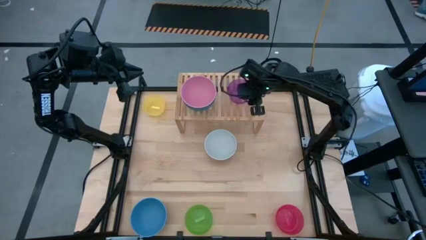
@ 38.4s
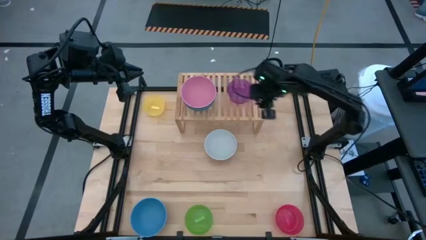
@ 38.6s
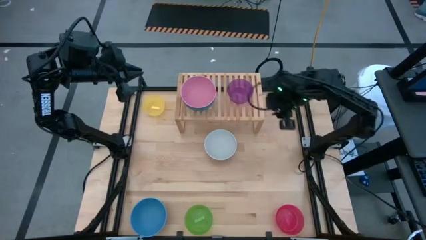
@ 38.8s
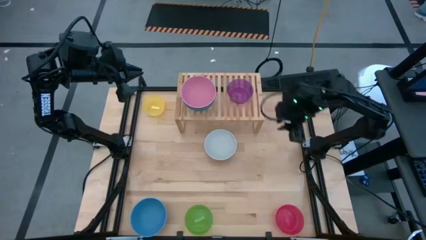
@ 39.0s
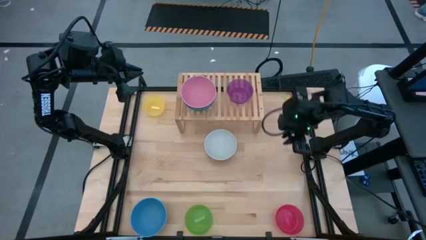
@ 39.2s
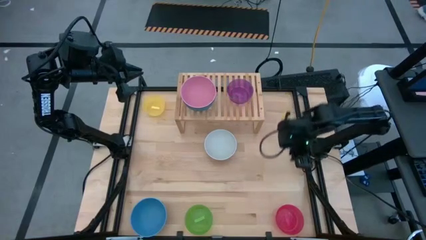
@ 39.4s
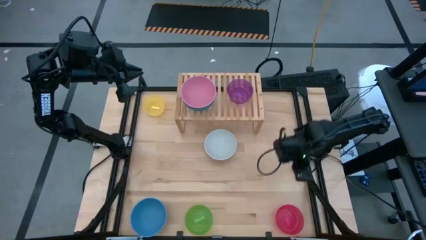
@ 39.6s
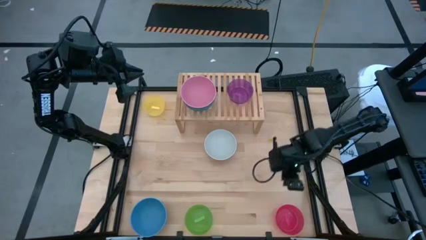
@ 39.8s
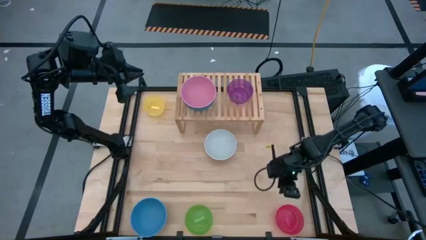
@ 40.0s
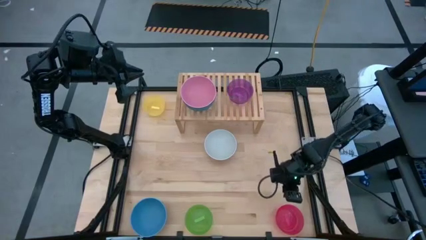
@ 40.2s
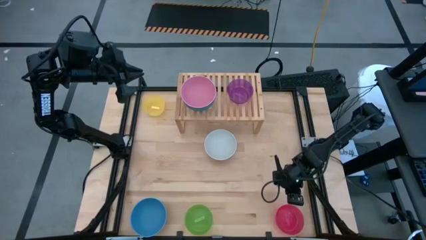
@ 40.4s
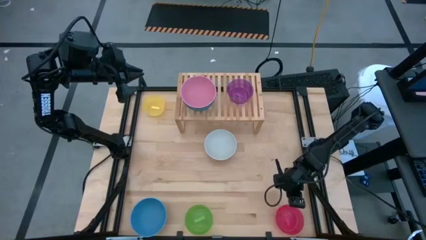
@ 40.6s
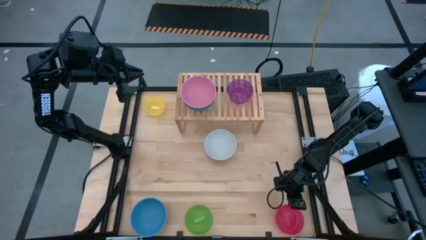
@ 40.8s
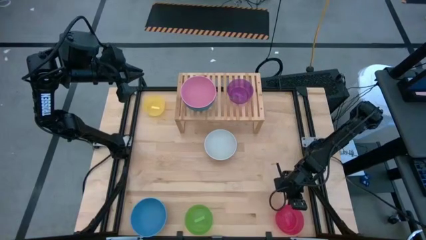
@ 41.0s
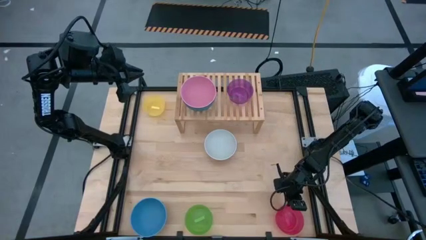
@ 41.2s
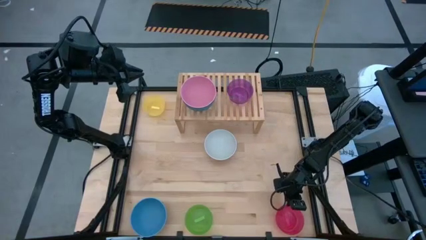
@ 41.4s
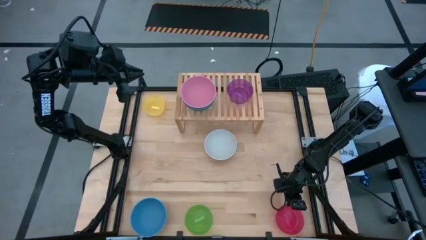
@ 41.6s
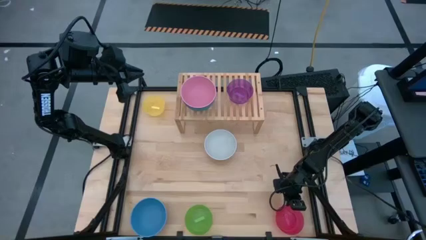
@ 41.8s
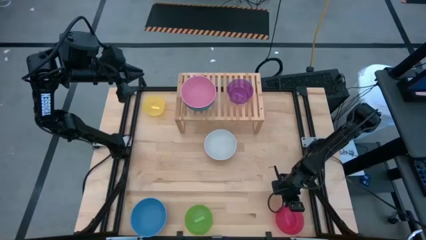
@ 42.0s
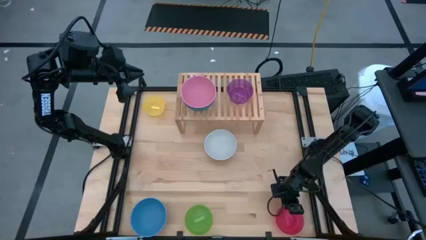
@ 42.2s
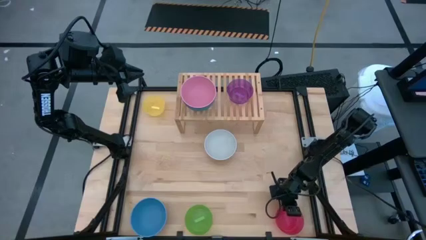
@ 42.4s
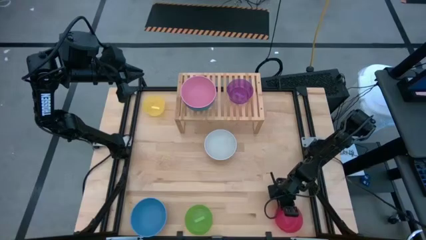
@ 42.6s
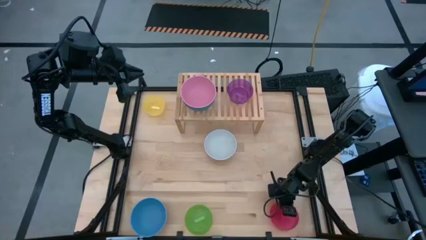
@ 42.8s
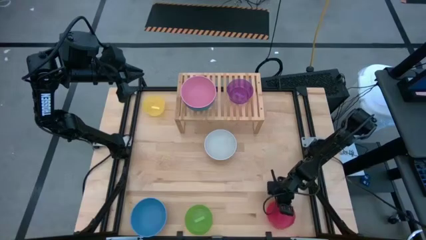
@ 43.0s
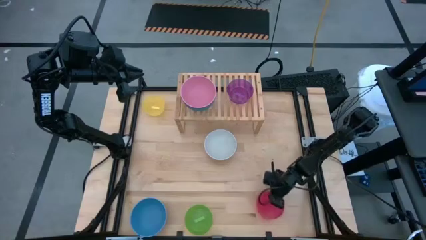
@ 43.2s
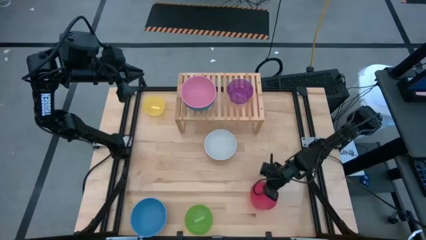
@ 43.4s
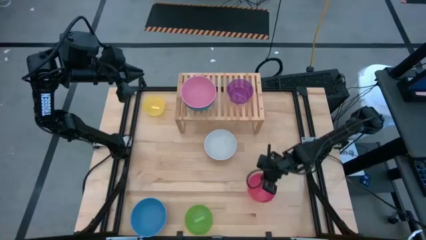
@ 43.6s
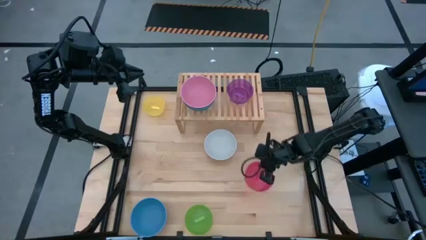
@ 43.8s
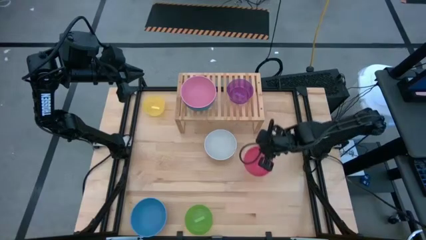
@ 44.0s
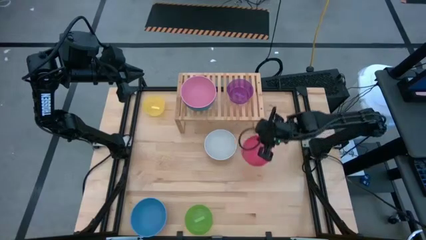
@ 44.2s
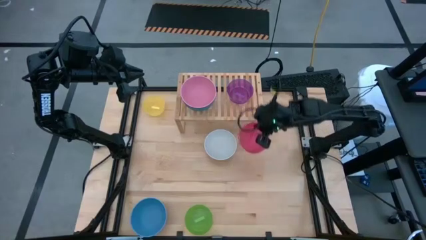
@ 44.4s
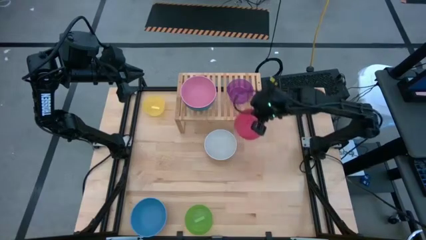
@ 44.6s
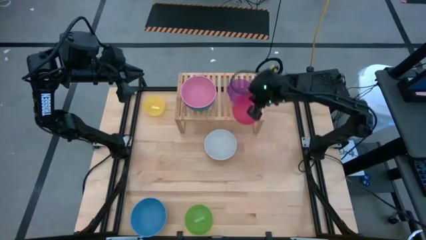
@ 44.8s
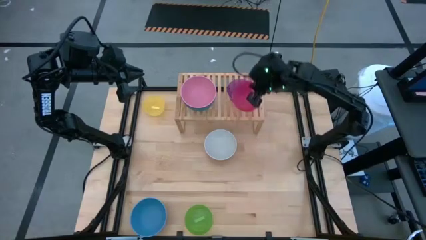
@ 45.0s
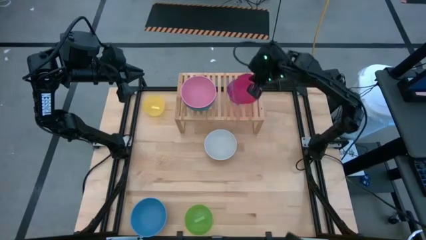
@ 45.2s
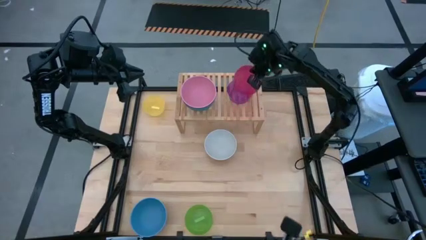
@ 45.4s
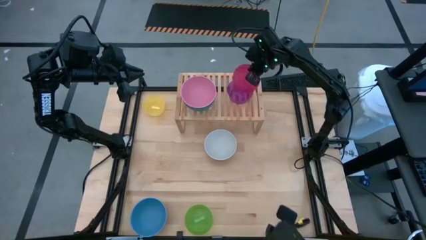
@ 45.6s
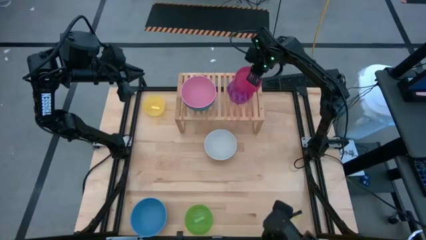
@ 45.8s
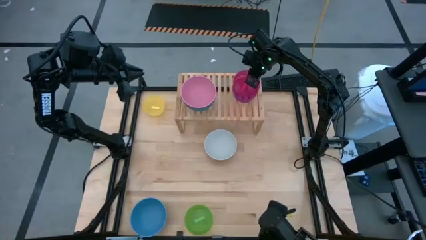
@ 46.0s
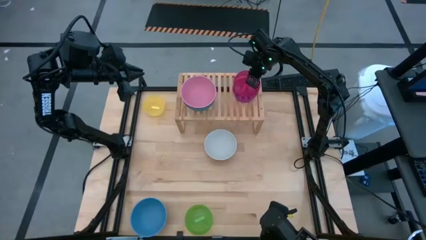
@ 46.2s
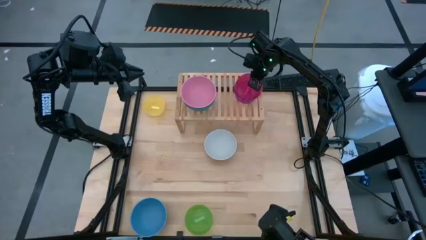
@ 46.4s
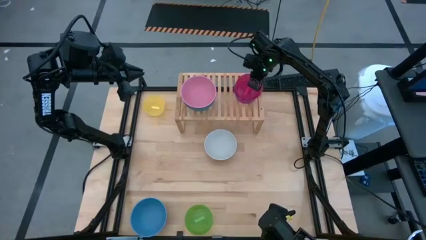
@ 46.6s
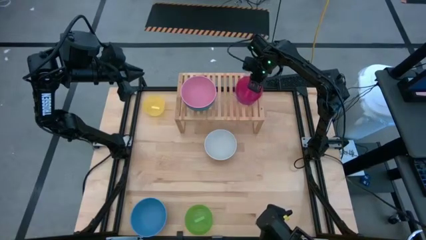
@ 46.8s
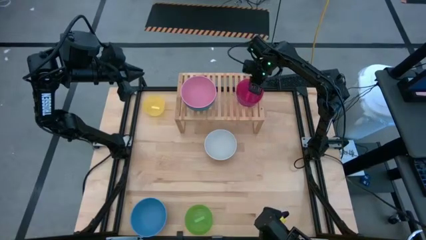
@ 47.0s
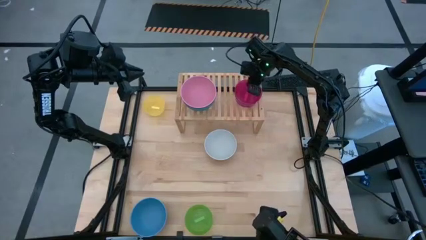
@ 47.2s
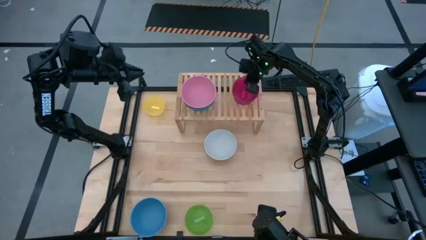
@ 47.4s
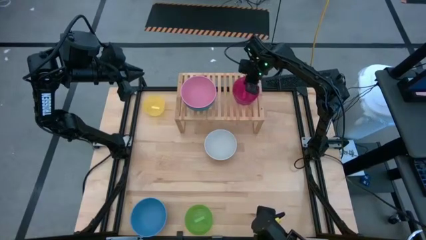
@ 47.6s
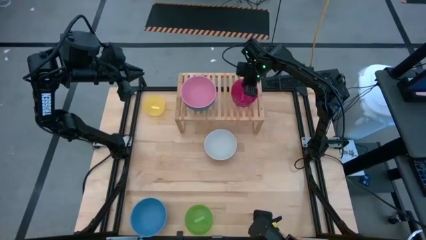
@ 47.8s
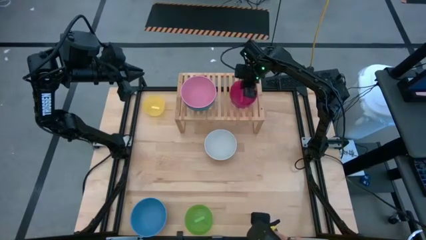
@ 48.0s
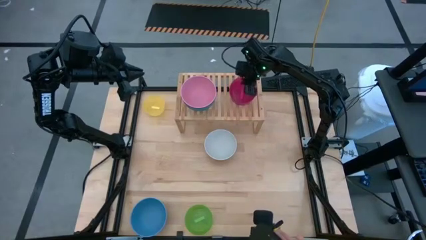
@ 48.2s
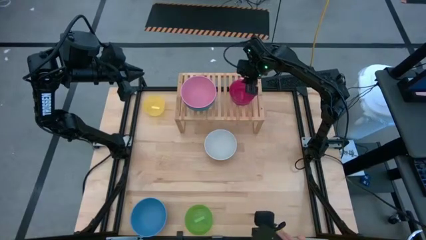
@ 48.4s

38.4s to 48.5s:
Task: Place and stack bowls onto a shelf
Stack the red bowl on top of the violet bowl on the shelf

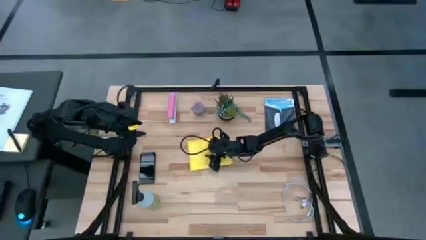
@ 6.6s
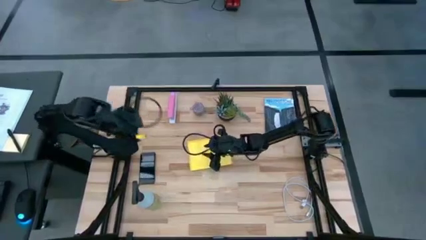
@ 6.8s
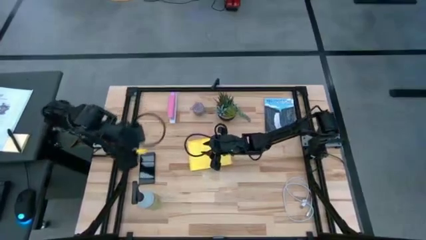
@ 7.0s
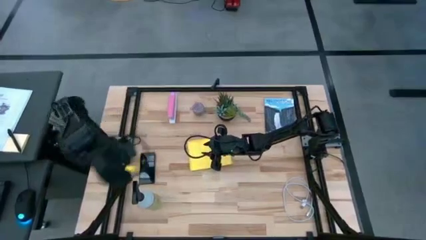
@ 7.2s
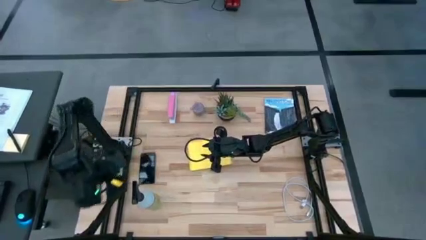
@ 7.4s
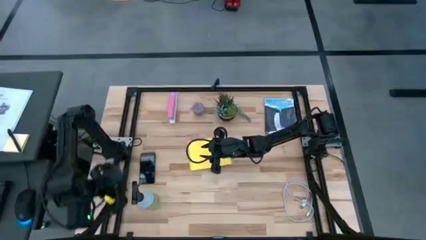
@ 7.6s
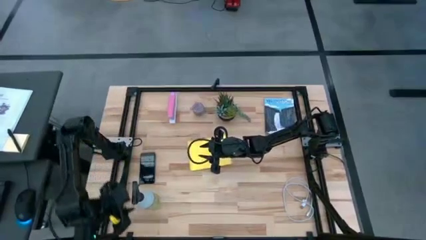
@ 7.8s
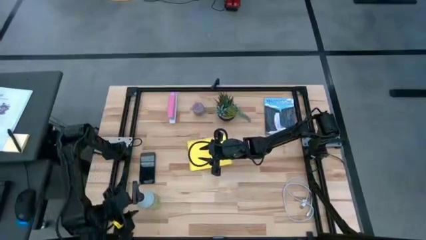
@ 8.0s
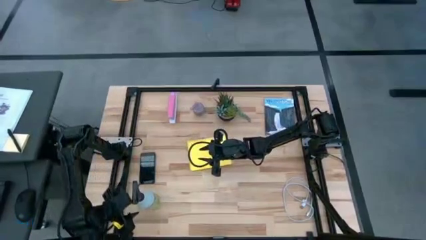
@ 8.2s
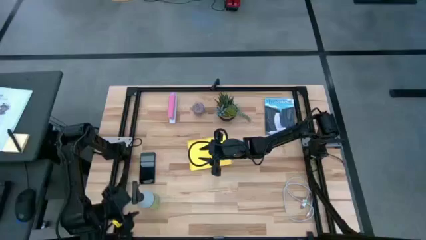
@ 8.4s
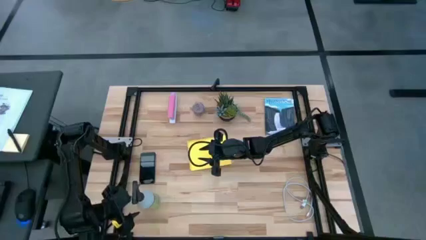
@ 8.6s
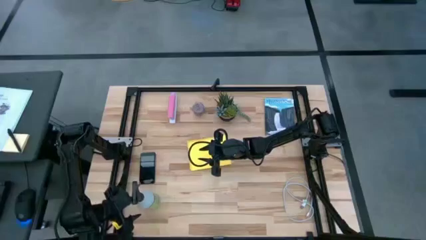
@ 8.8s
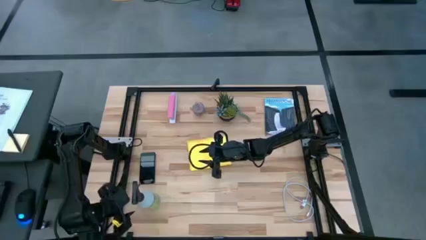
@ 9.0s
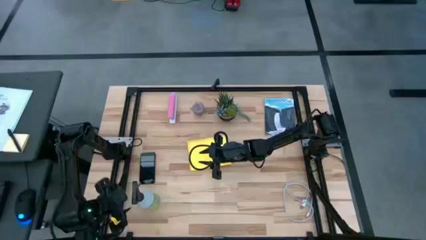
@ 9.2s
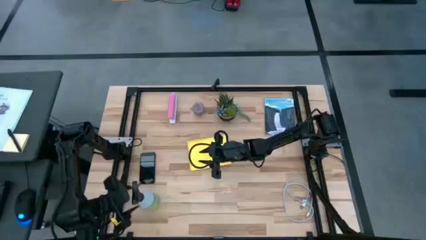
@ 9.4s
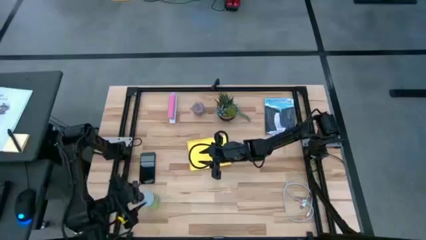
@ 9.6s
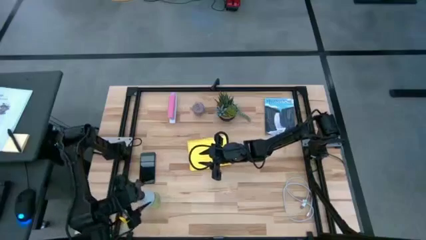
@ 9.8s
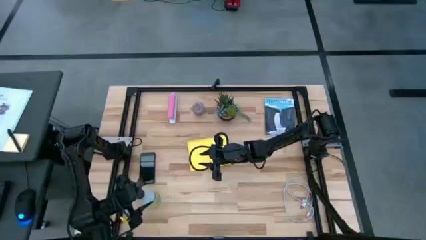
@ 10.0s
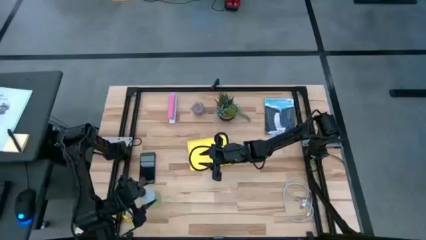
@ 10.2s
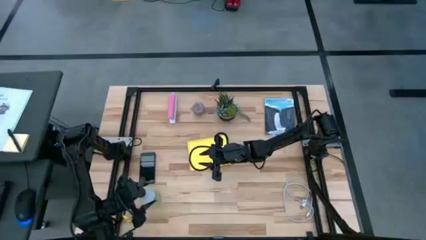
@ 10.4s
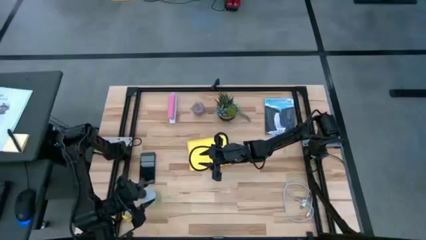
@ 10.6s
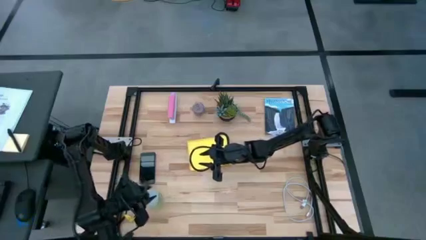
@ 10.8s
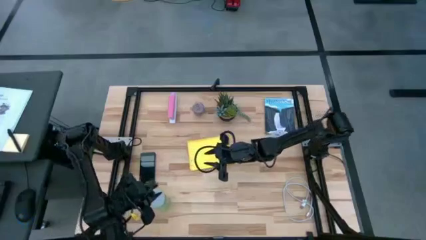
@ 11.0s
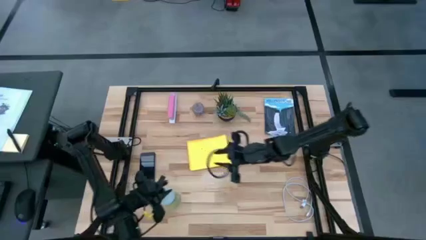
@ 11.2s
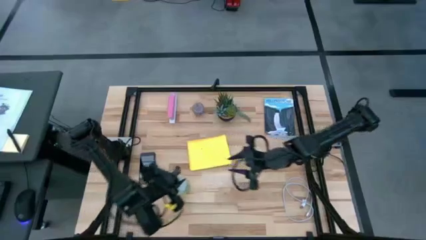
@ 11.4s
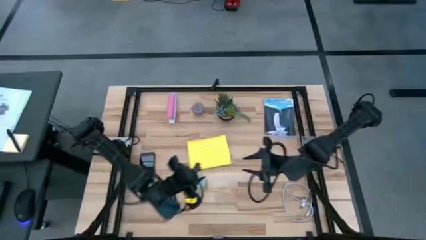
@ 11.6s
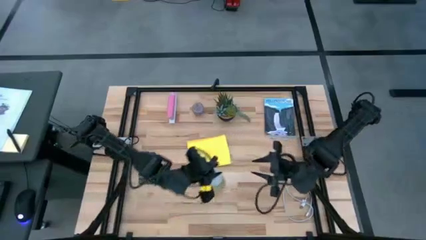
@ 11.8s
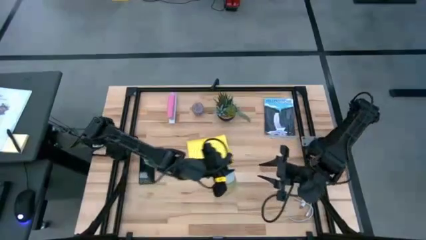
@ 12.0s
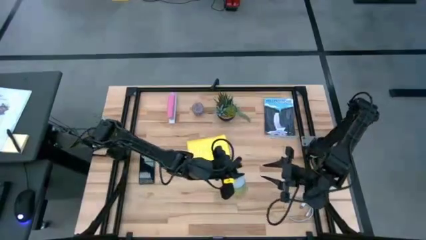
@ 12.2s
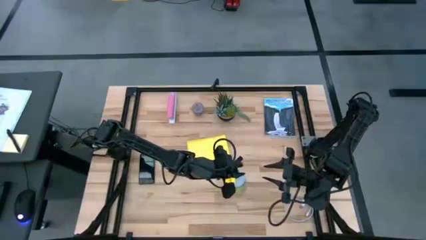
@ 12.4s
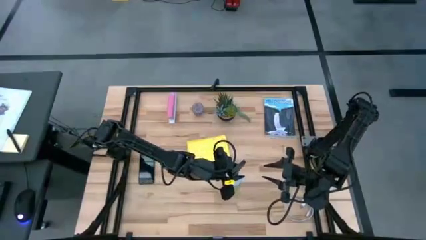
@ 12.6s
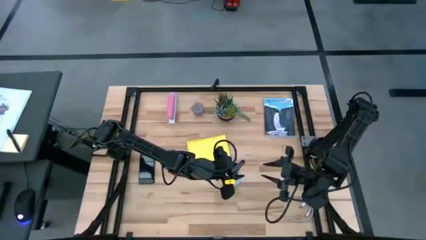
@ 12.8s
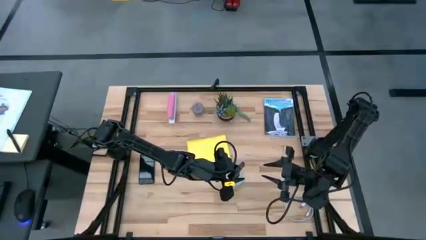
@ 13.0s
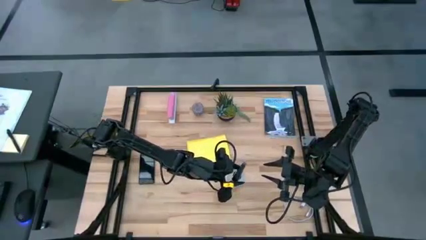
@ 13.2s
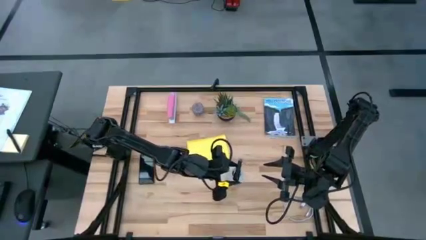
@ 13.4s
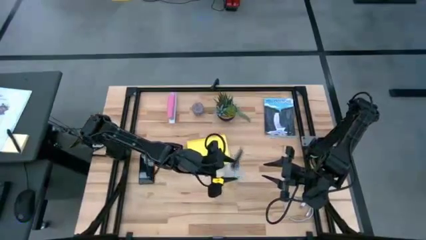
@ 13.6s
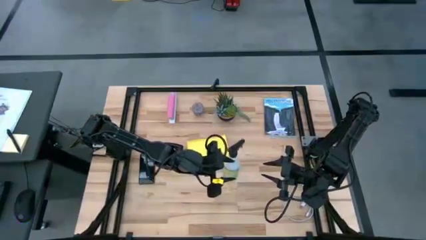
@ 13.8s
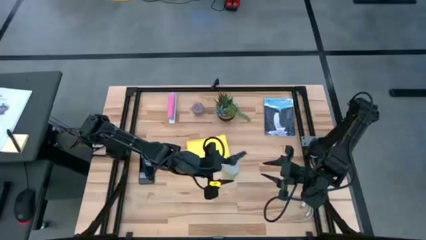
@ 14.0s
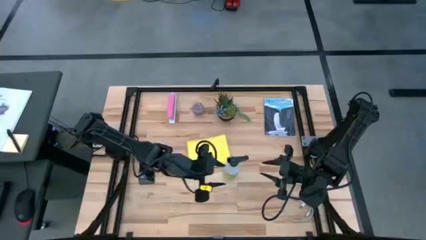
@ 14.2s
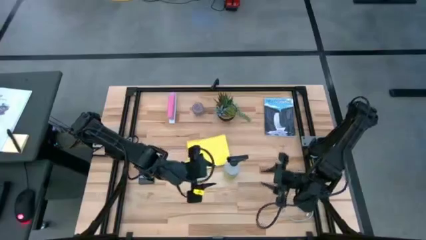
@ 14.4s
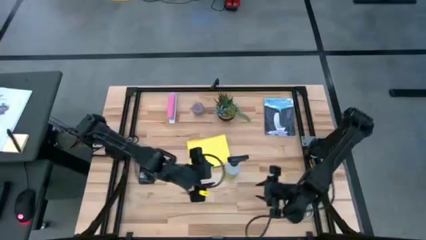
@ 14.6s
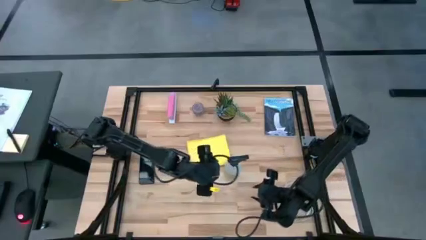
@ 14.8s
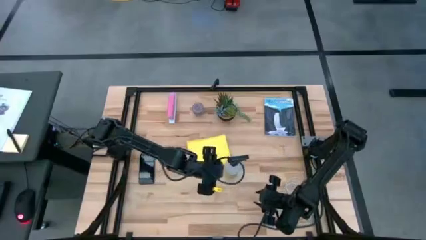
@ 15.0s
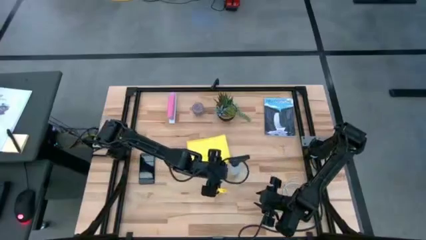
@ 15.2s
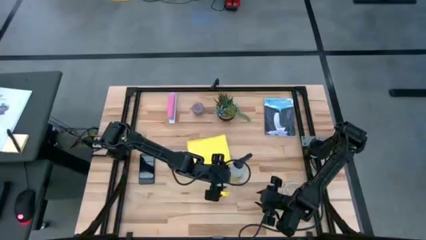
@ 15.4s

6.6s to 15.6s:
Task: Apply microfiber cloth
Move the spray bottle to the center right
